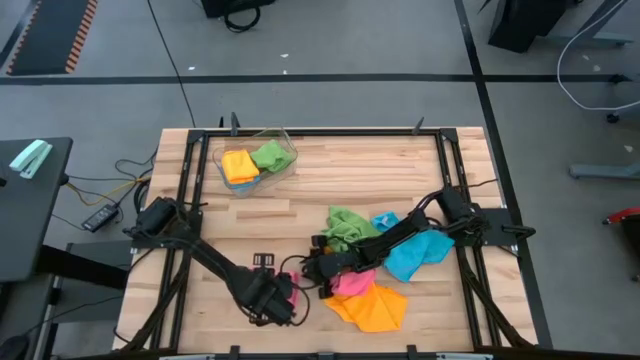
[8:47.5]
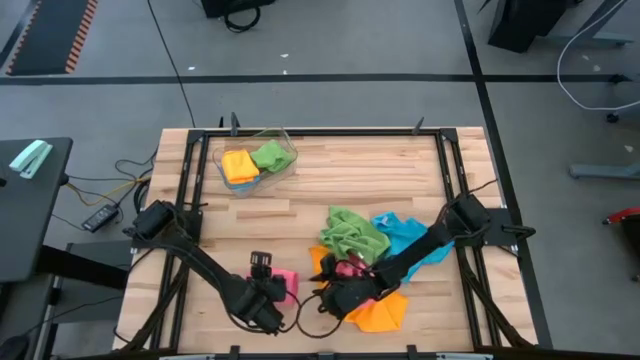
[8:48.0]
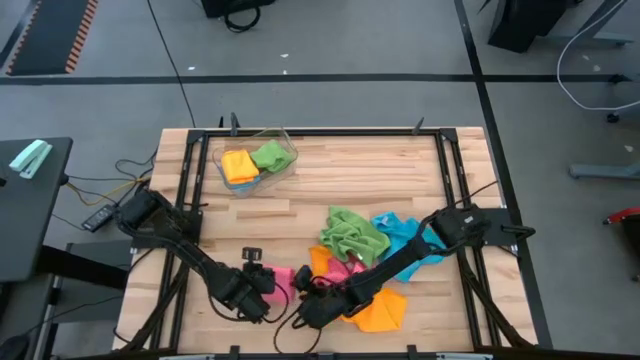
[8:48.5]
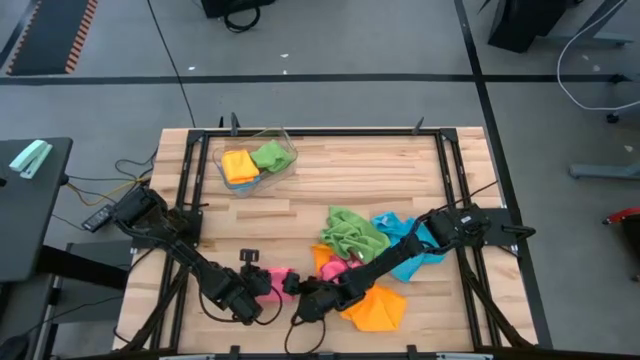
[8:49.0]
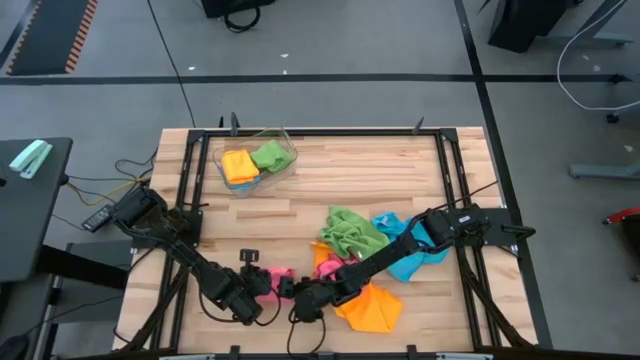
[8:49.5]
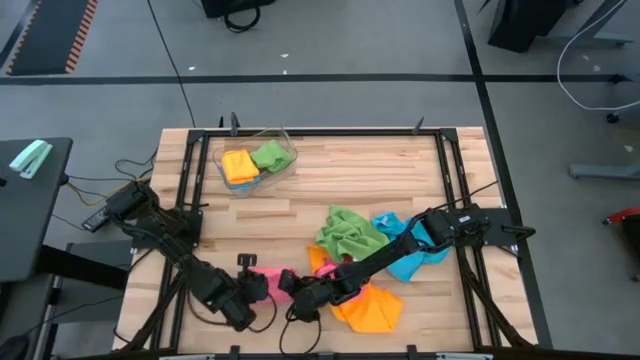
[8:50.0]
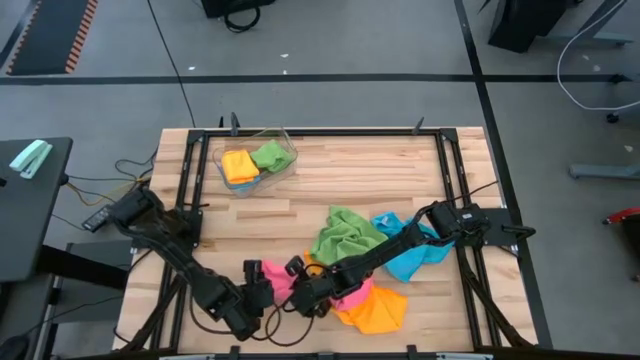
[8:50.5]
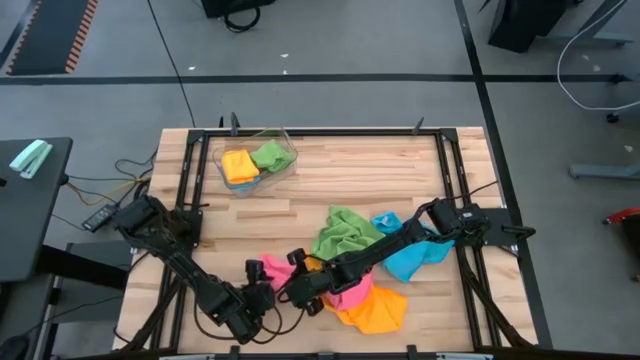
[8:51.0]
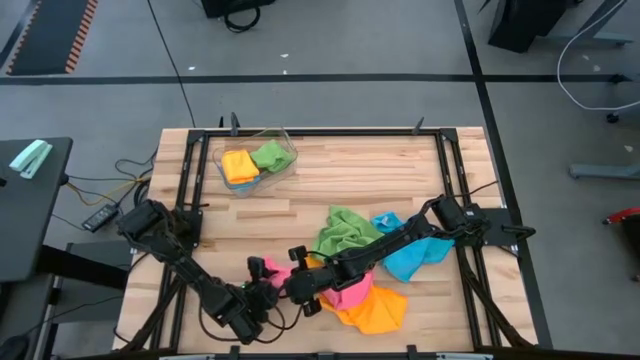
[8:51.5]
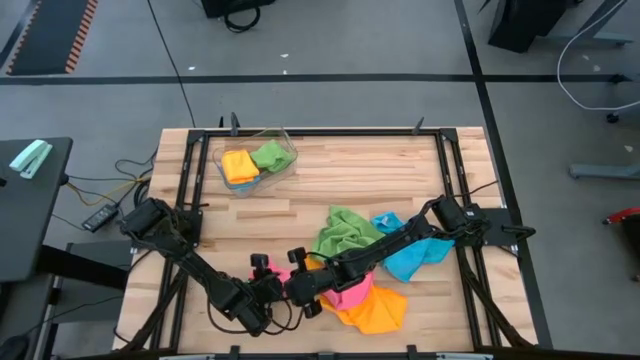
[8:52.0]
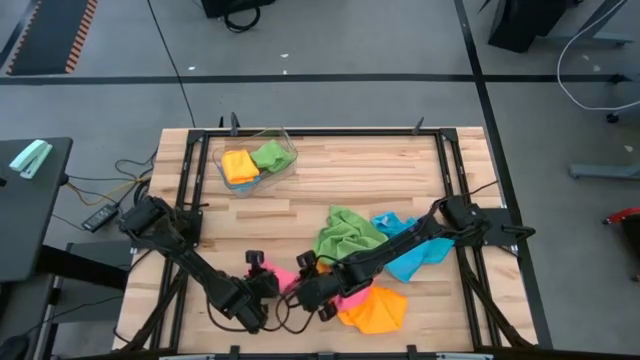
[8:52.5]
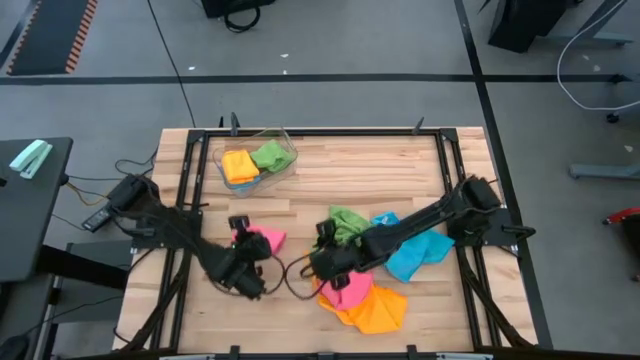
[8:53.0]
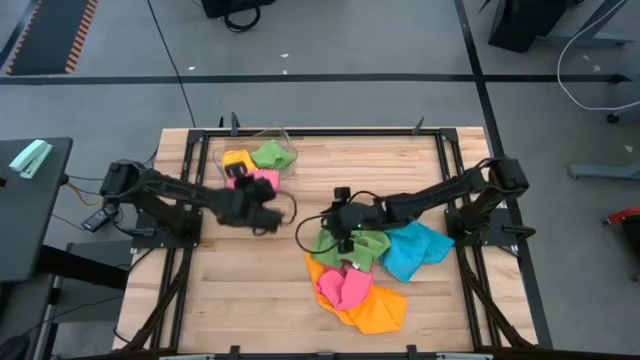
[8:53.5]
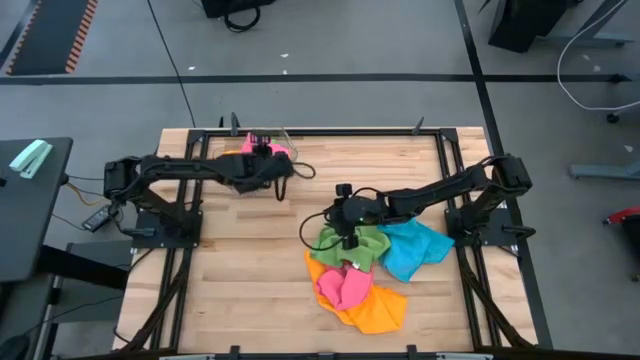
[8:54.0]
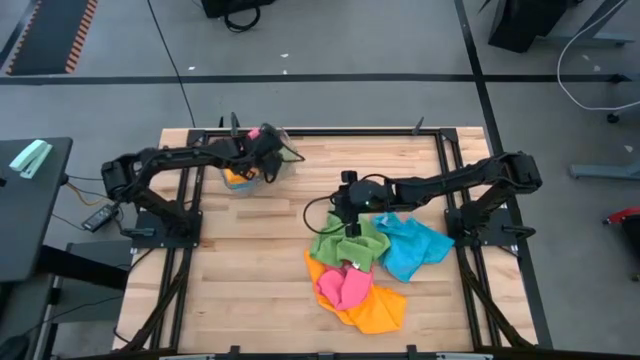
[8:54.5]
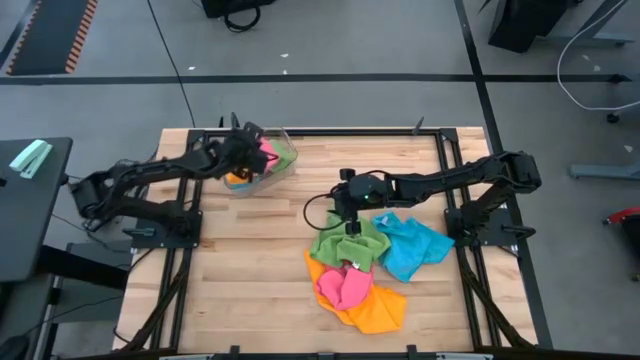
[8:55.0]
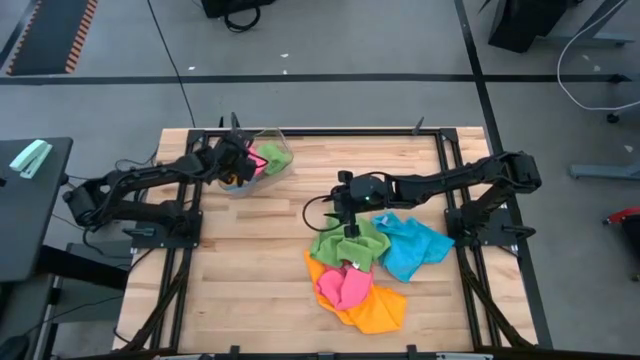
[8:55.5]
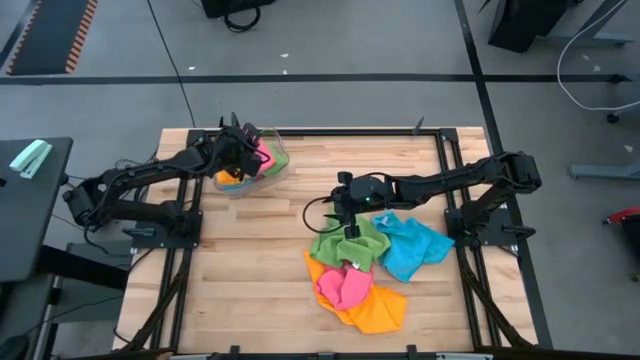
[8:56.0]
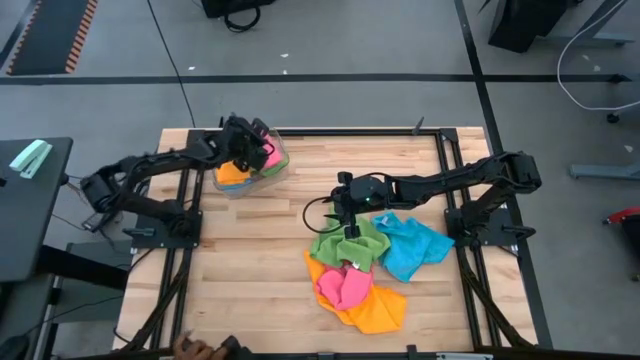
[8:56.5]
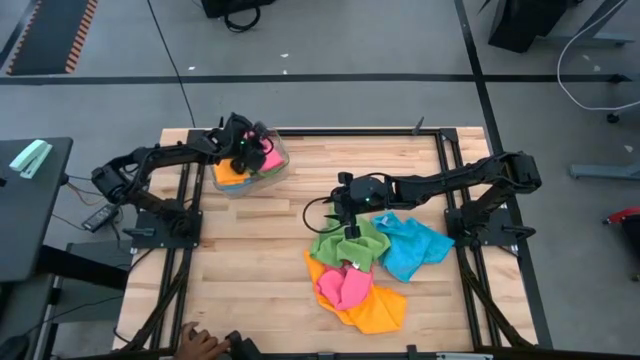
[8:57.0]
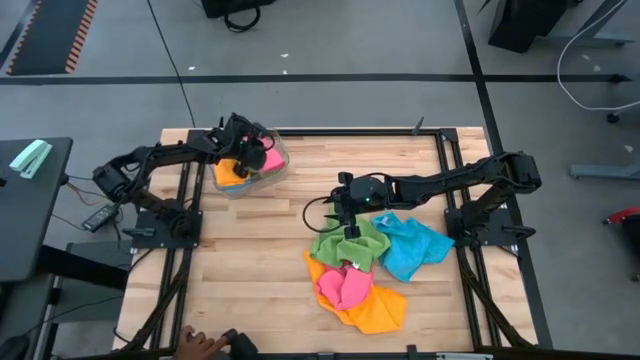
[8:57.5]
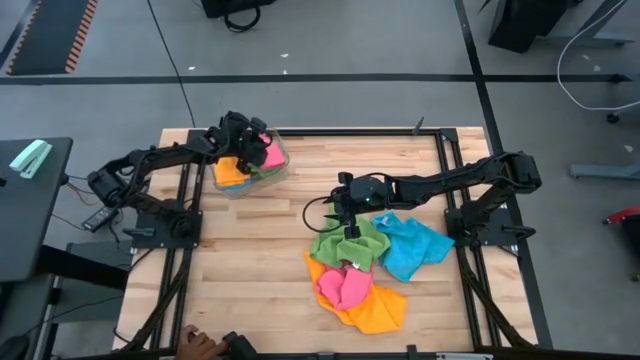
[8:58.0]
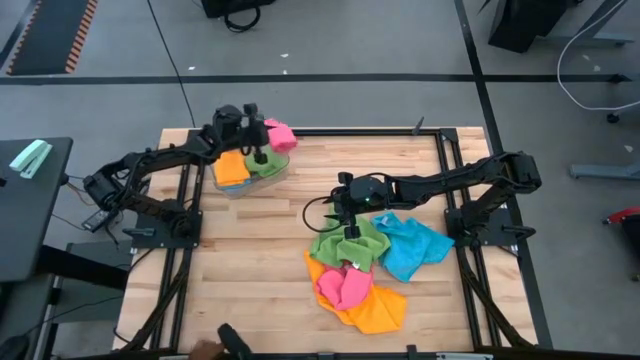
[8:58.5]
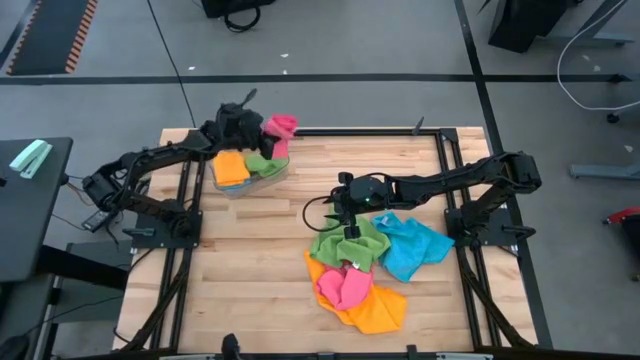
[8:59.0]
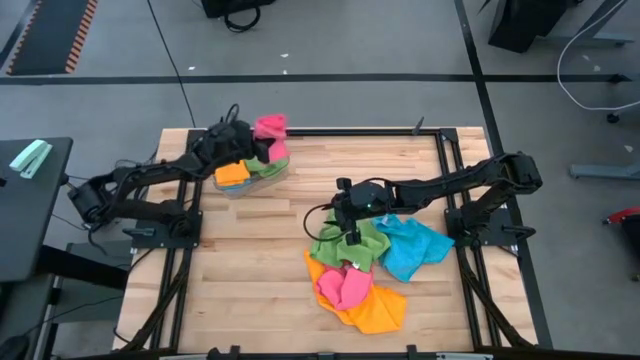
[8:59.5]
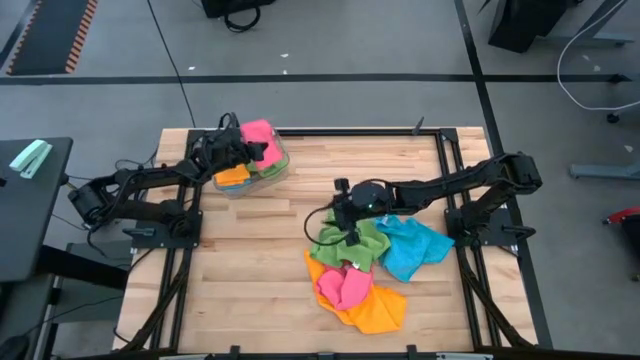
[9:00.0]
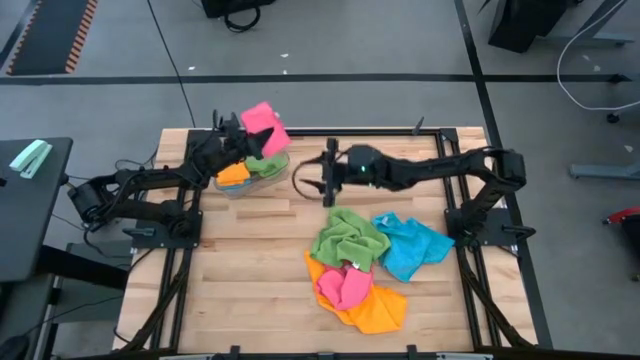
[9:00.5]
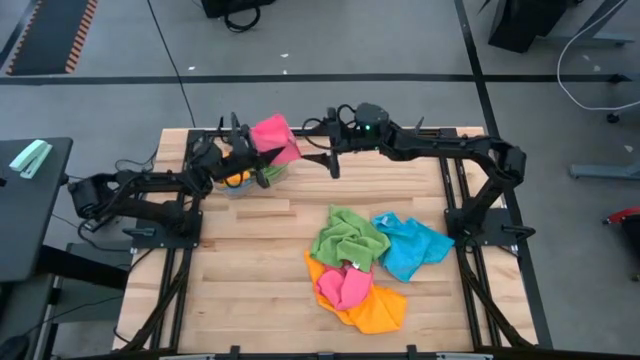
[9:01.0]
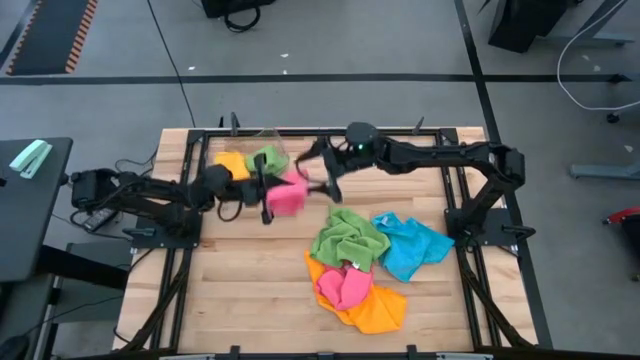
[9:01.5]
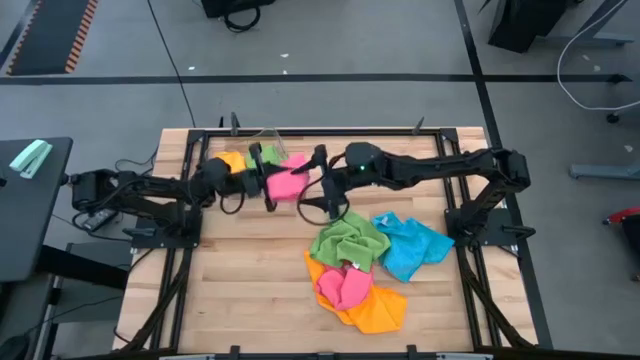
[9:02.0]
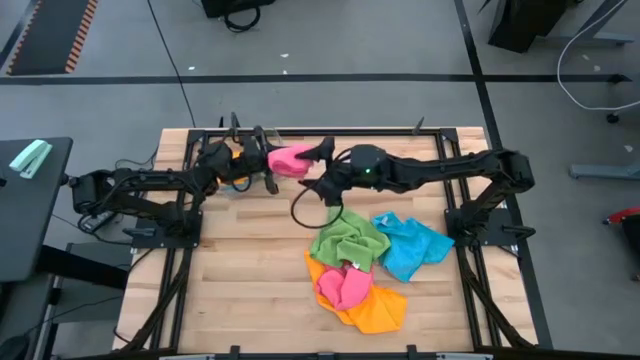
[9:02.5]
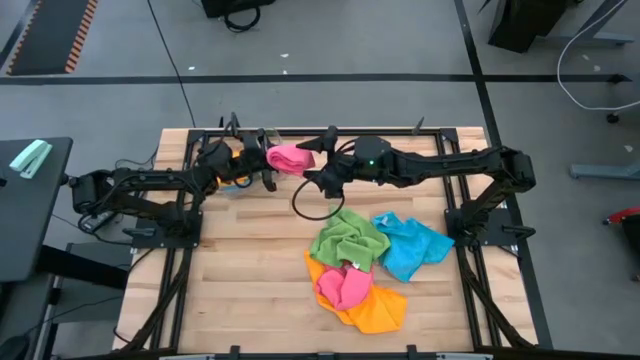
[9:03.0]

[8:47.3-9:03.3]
Task: Fold microfiber towels
Stack the left pink microfiber towel on top of the green microfiber towel

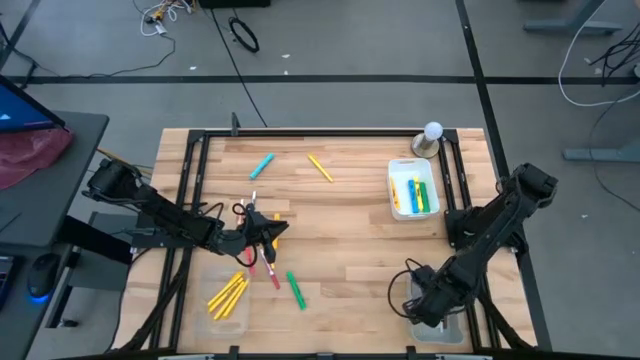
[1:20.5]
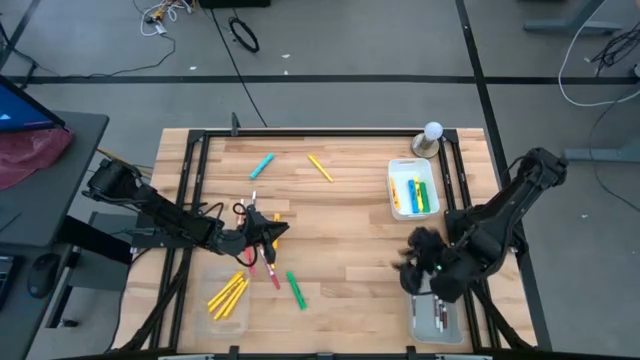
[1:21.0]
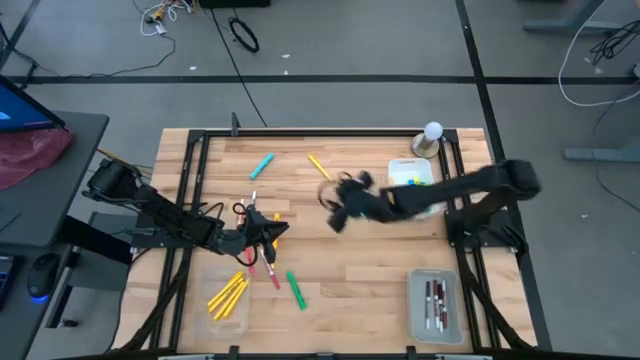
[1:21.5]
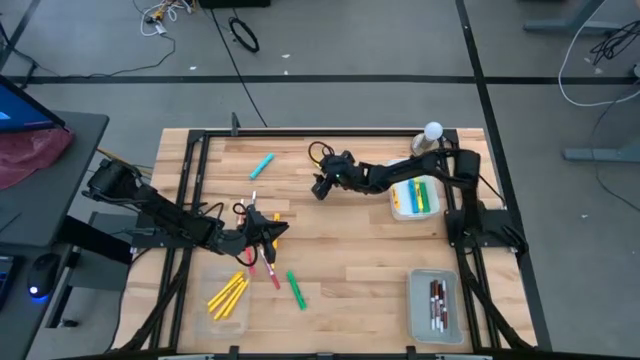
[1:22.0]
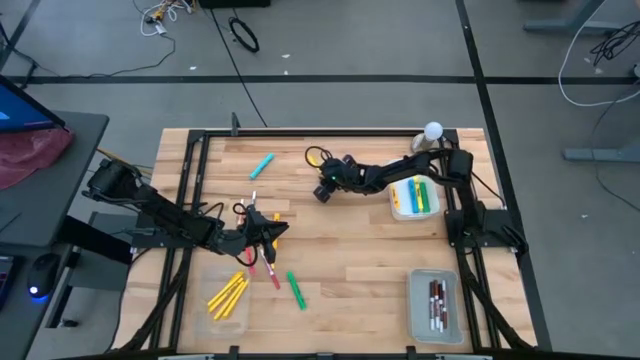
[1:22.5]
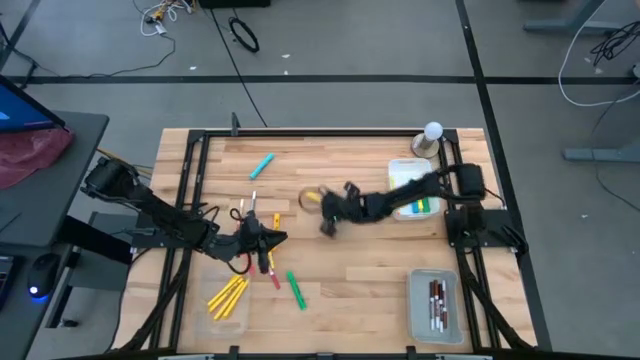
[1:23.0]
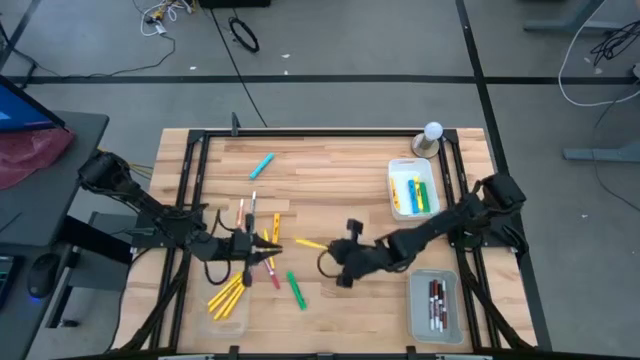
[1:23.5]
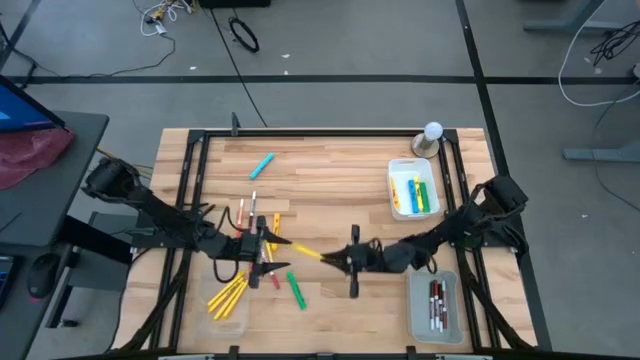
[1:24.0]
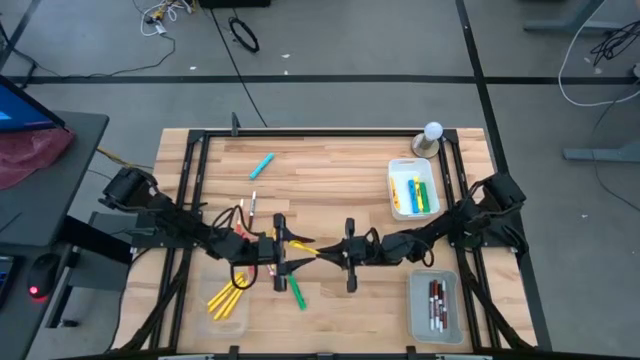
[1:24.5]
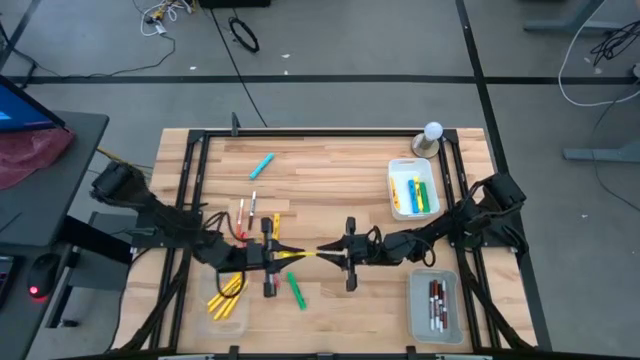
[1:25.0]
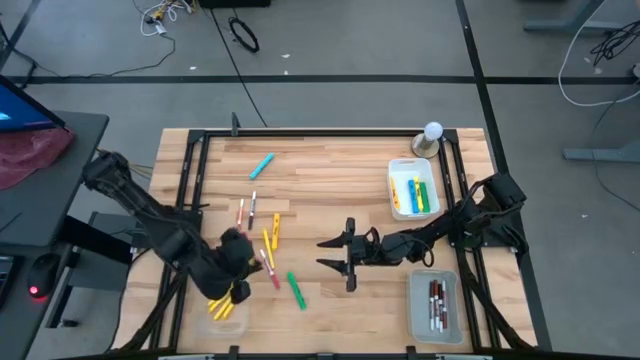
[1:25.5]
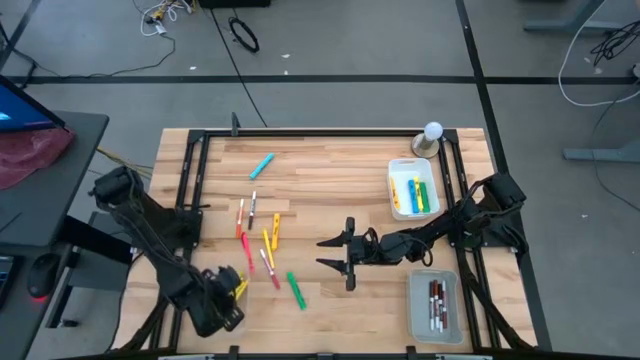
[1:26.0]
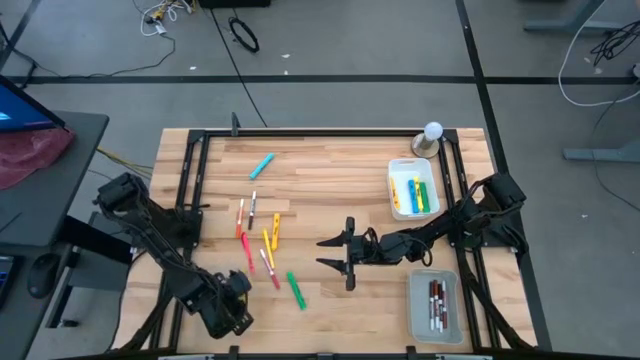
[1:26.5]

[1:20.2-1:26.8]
Task: Pick & Place Markers
Put the yellow pen into the transparent bin
